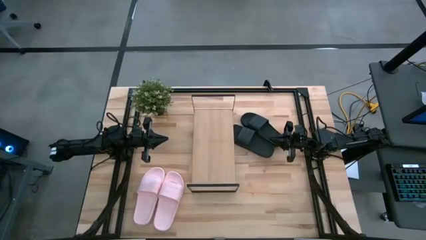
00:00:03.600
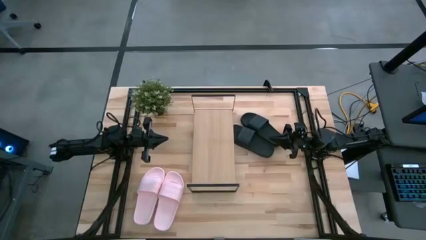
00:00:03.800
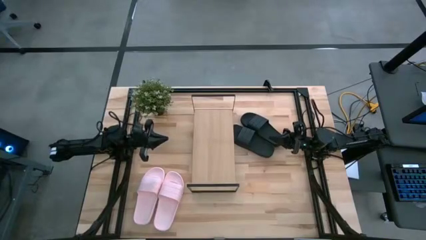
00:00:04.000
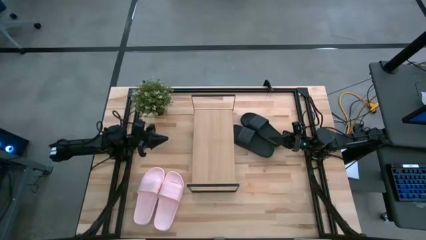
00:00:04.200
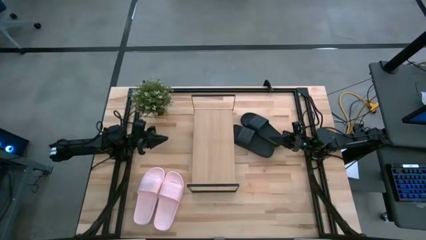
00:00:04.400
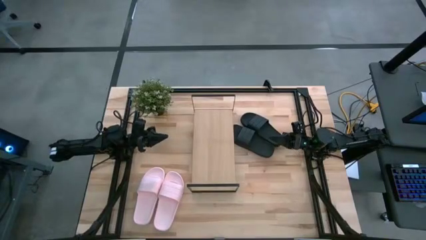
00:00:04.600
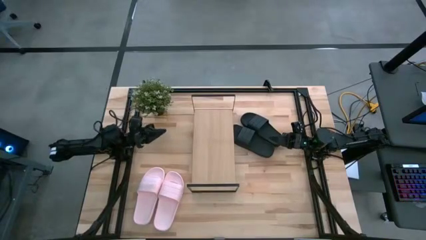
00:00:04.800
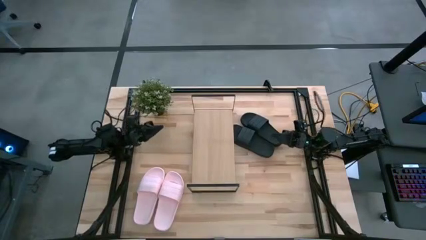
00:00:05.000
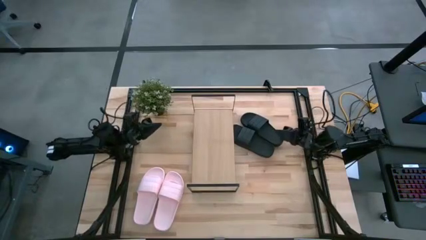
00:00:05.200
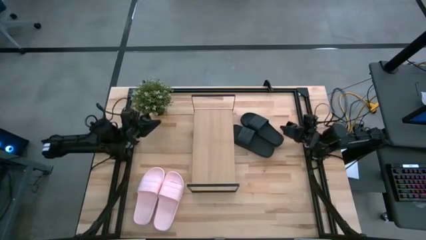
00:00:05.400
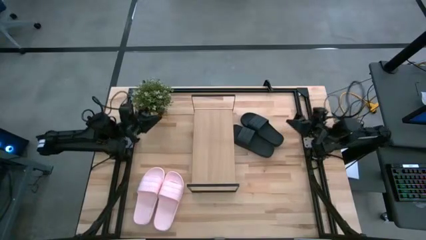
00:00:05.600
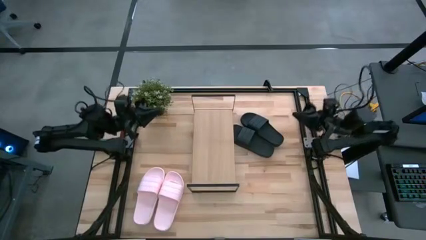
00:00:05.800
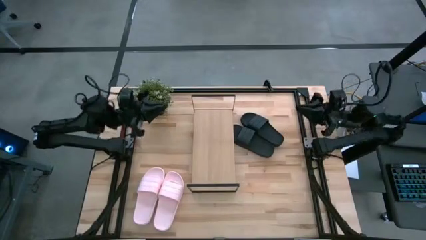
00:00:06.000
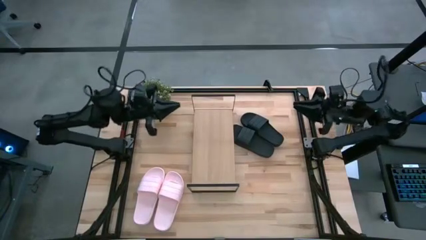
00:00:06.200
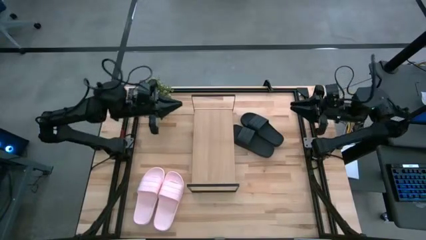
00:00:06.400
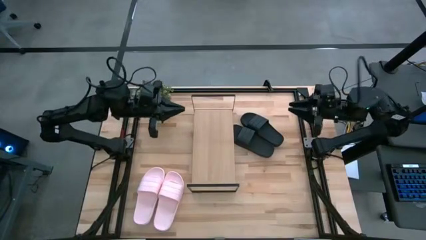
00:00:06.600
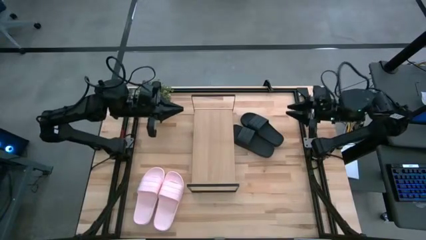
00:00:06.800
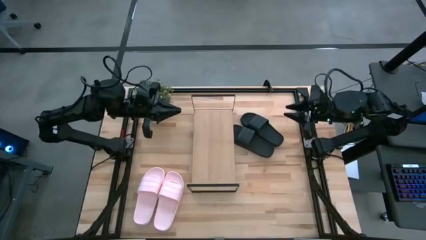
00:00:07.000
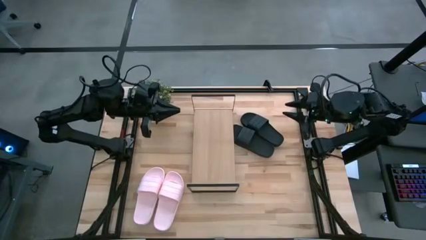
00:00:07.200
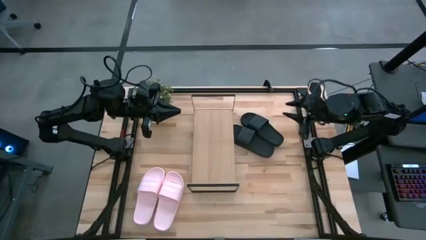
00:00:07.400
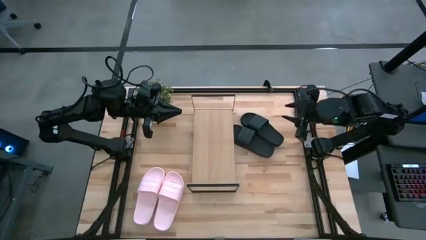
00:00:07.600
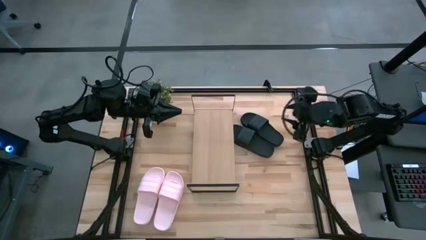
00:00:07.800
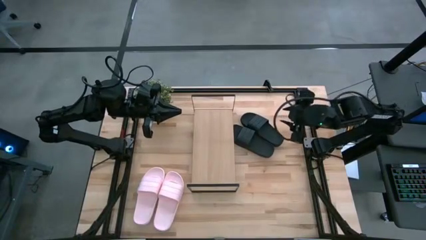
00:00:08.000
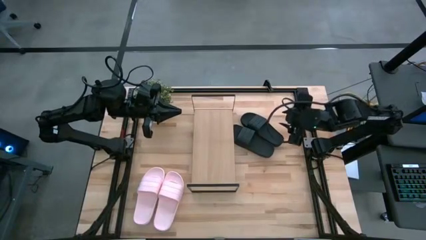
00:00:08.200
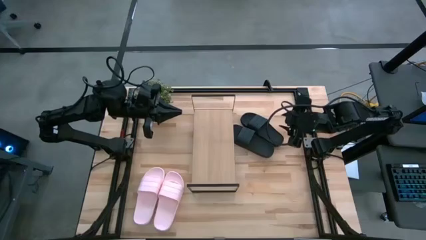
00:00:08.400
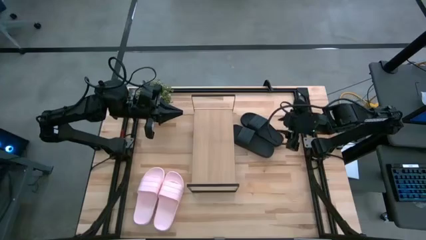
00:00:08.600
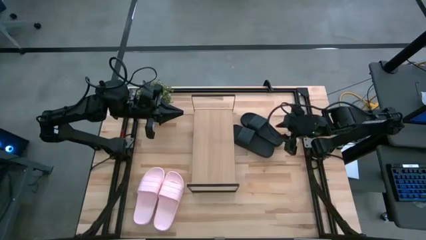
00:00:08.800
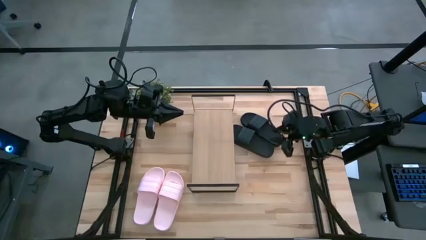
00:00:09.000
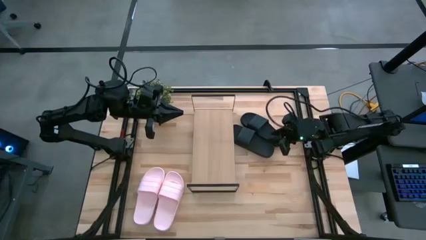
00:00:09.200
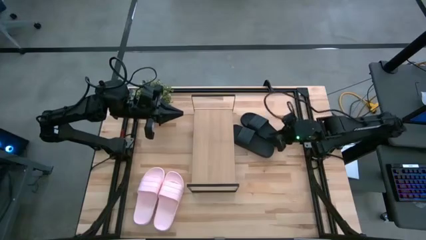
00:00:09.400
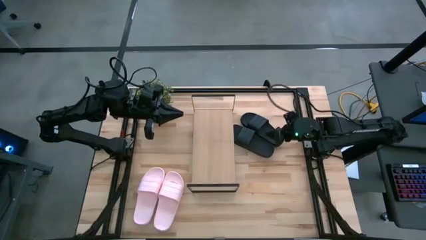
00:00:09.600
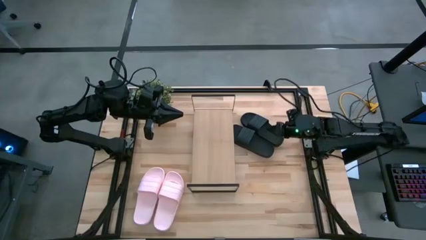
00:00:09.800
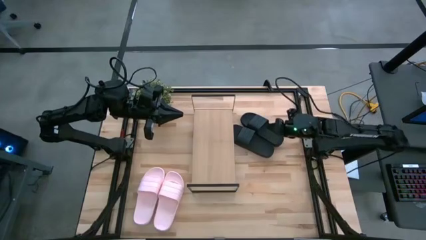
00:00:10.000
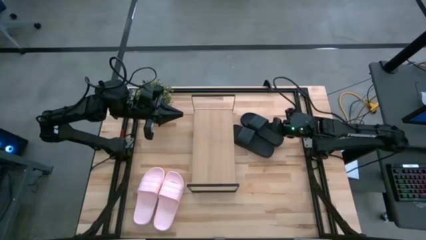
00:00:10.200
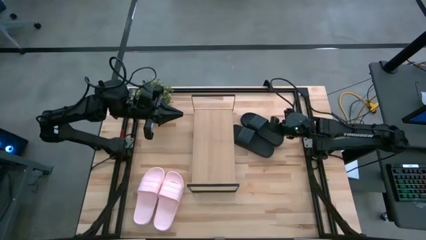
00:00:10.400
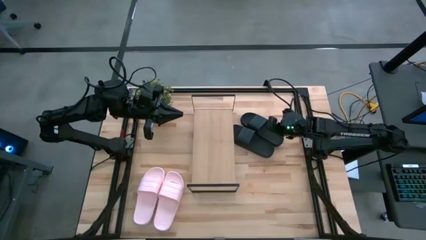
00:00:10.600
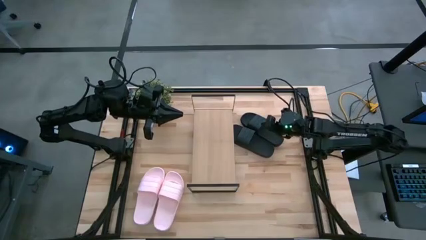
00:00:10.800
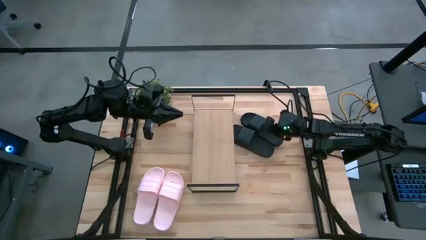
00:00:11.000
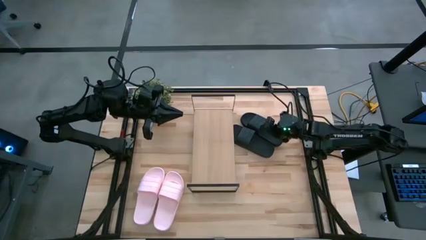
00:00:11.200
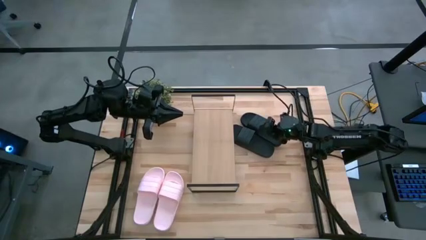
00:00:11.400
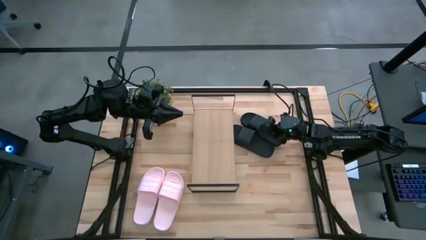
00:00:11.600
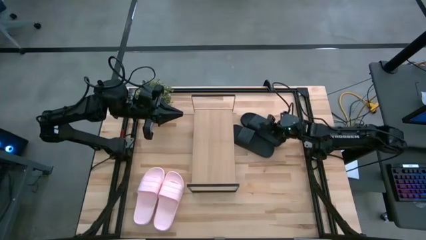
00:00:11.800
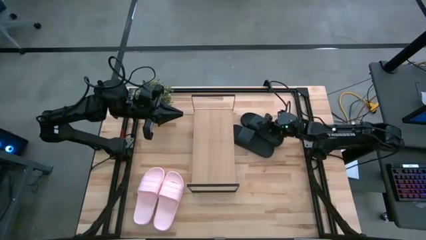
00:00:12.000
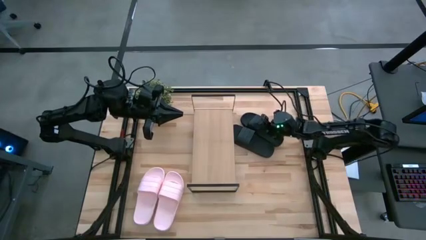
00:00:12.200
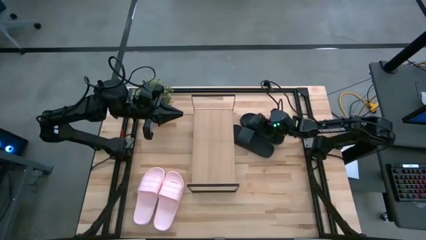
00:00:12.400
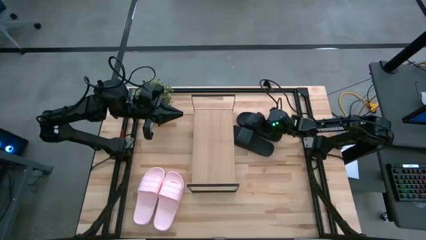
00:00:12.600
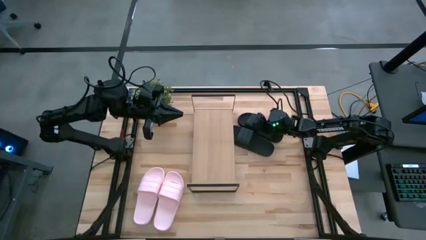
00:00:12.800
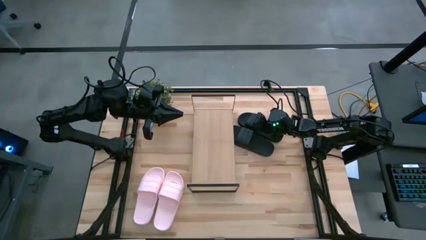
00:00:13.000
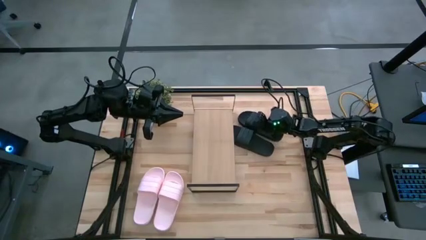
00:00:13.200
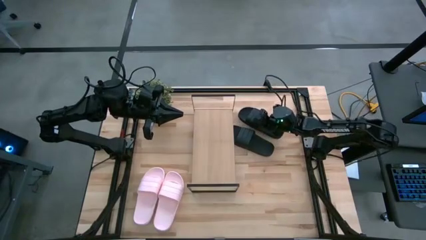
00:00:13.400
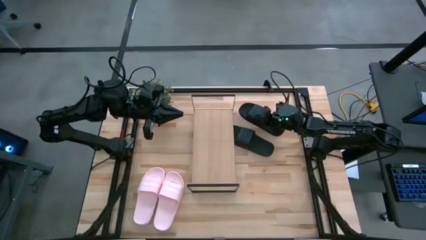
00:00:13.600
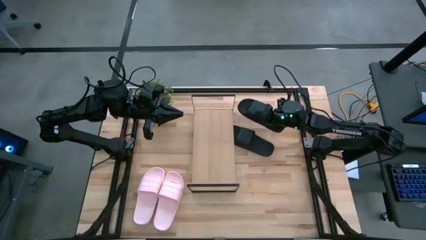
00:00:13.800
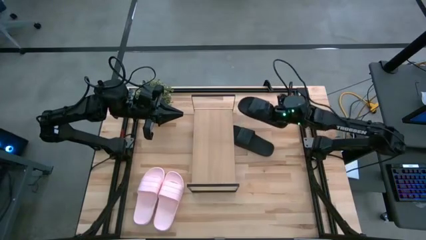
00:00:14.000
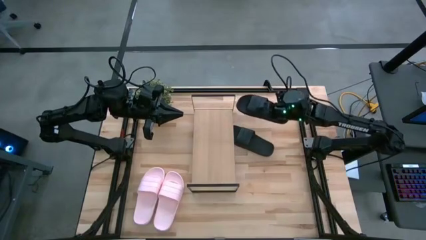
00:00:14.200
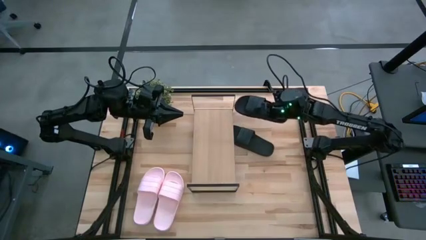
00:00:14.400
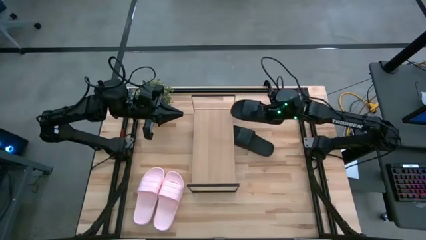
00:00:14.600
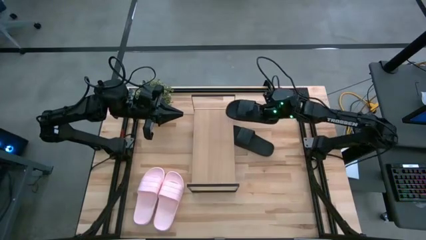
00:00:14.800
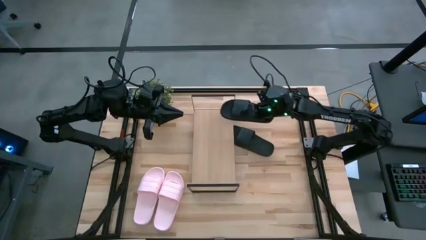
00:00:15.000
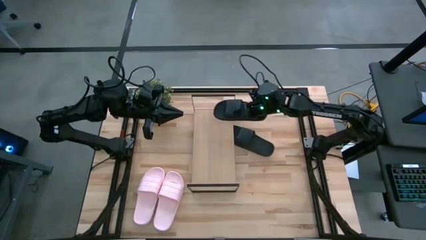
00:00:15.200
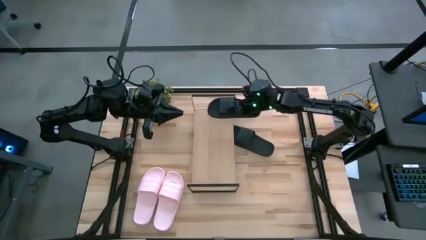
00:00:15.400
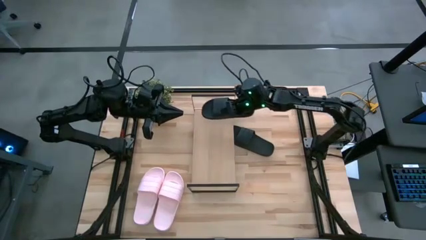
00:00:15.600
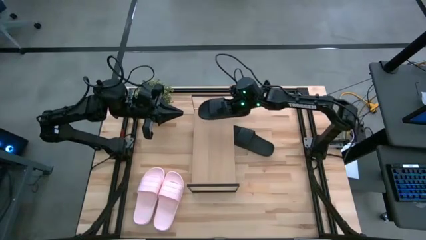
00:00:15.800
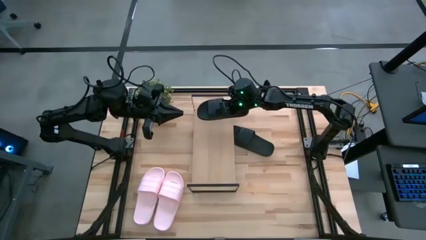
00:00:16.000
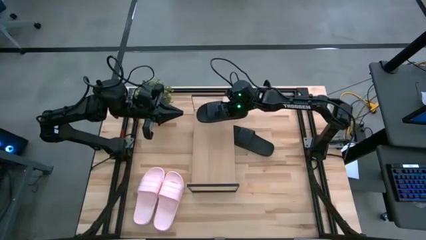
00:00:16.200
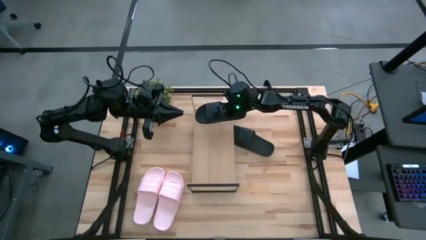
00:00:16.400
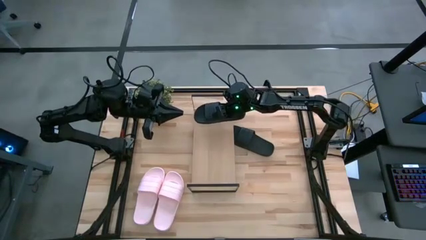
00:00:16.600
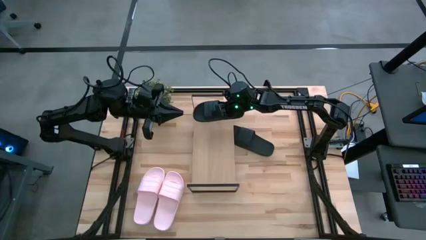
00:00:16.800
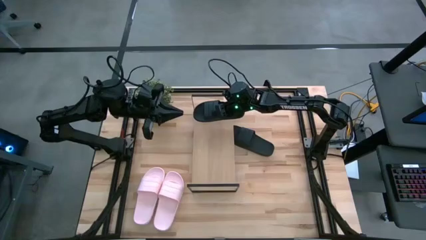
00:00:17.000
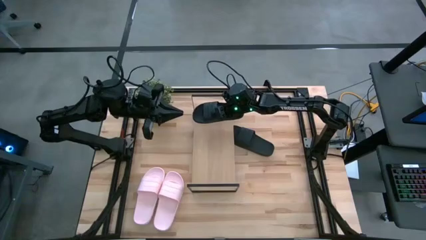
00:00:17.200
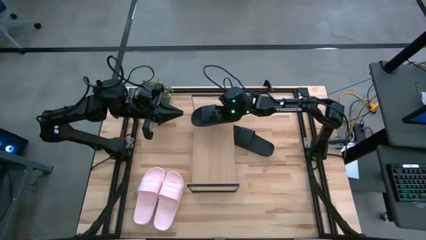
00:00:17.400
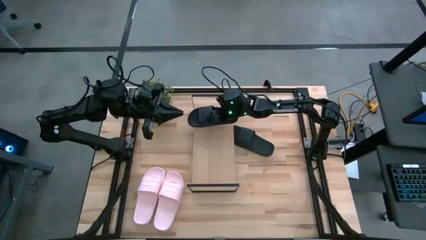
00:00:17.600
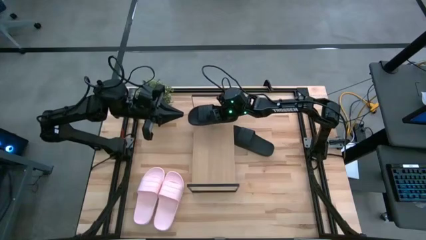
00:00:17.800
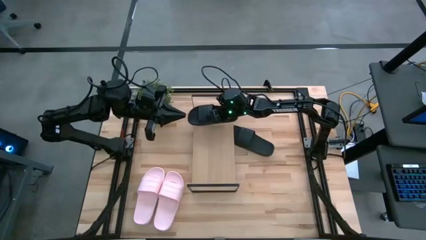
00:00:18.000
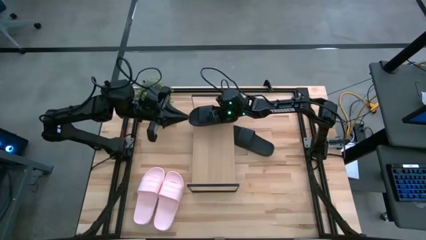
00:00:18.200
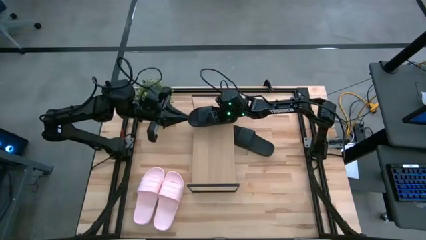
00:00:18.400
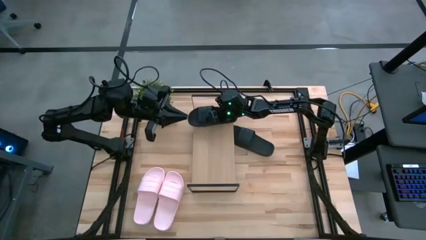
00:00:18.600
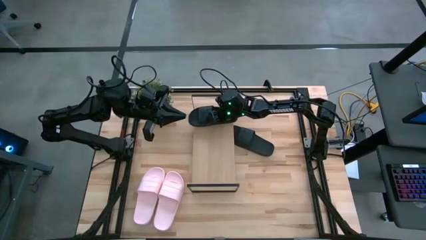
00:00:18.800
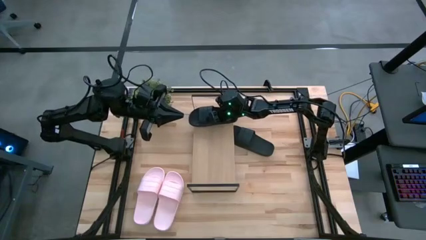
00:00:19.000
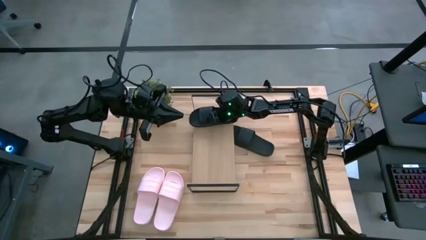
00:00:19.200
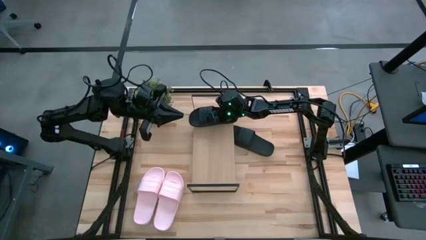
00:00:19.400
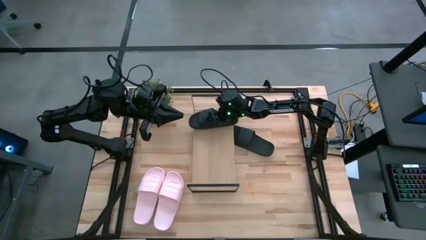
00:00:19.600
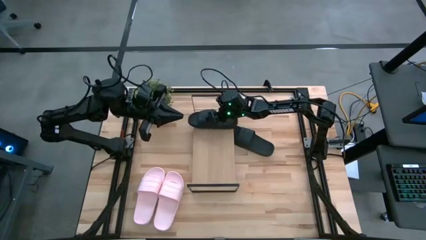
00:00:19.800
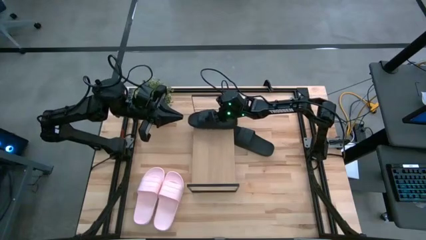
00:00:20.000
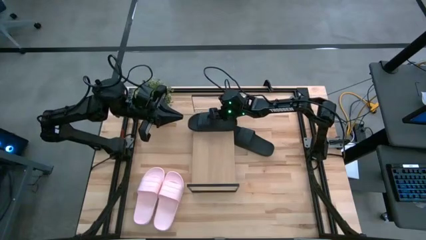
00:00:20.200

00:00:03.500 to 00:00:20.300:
Task: Pick and place slides into the shelf
Put the right black slide on the shelf
